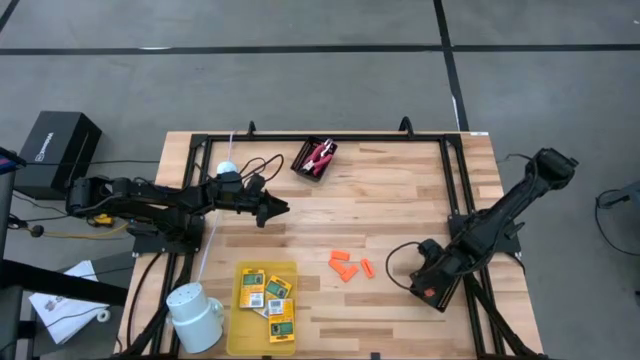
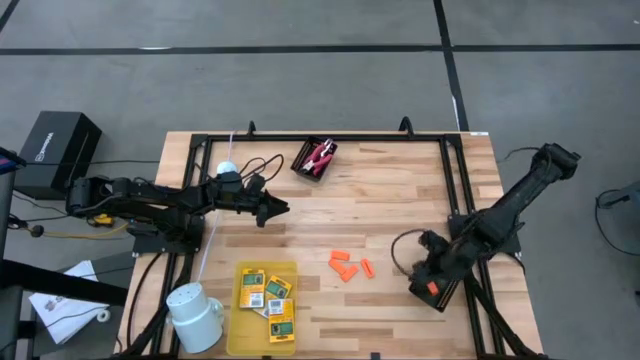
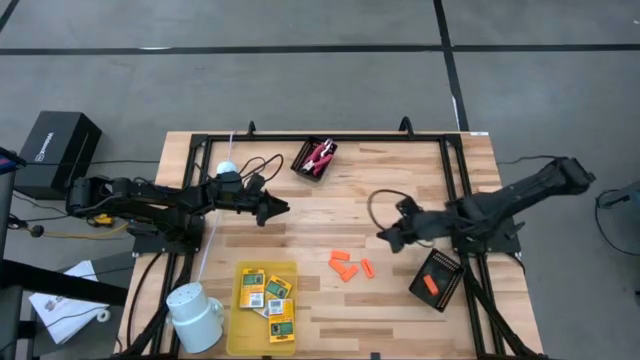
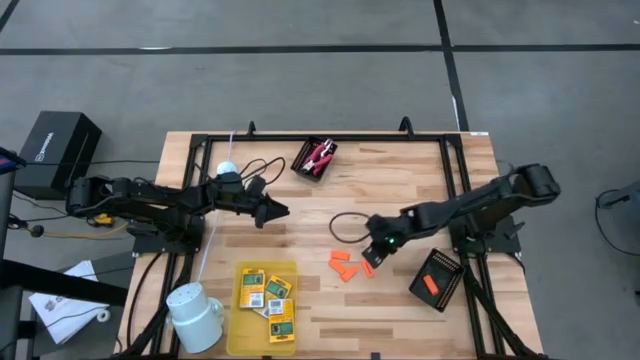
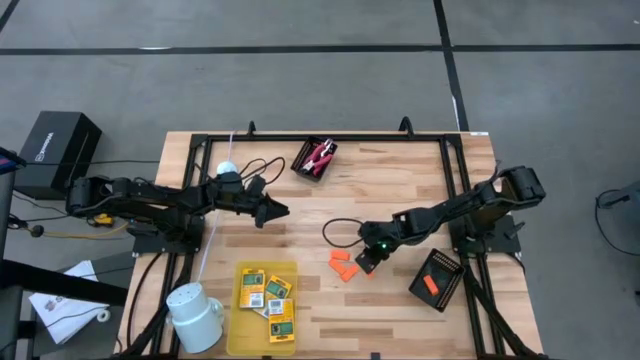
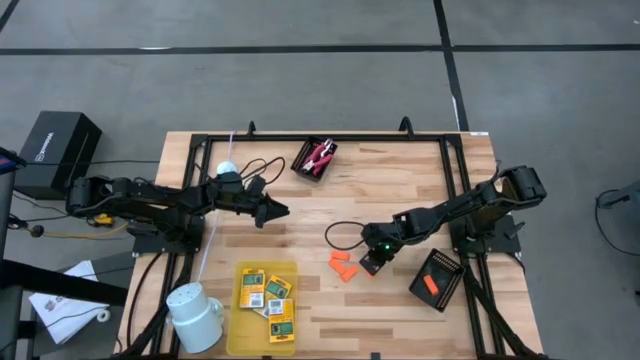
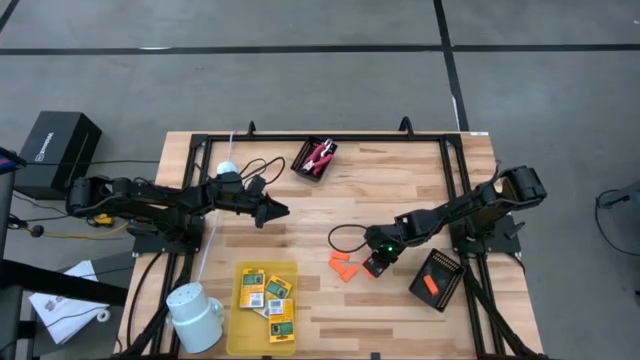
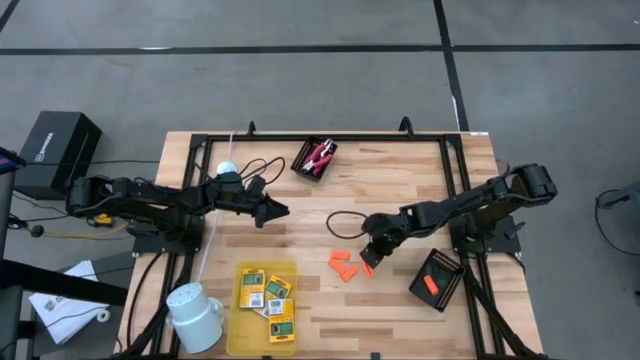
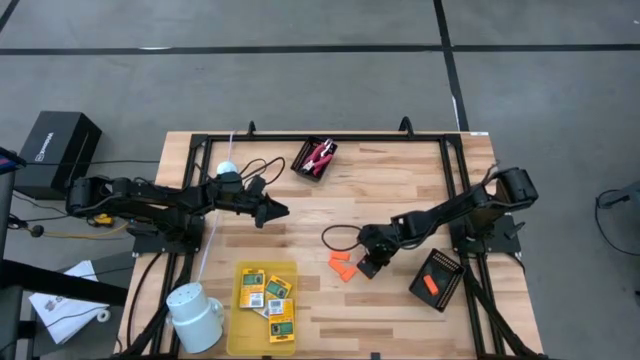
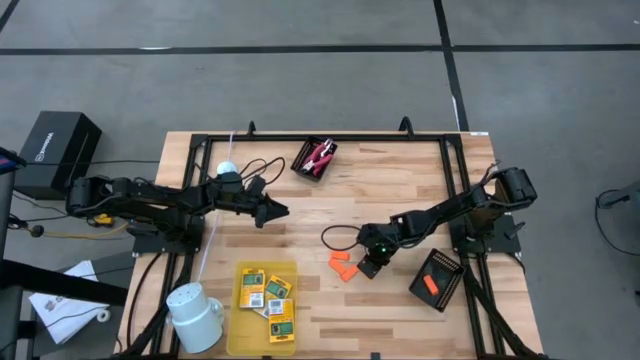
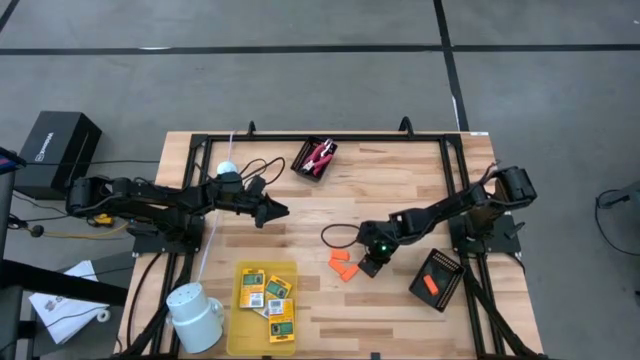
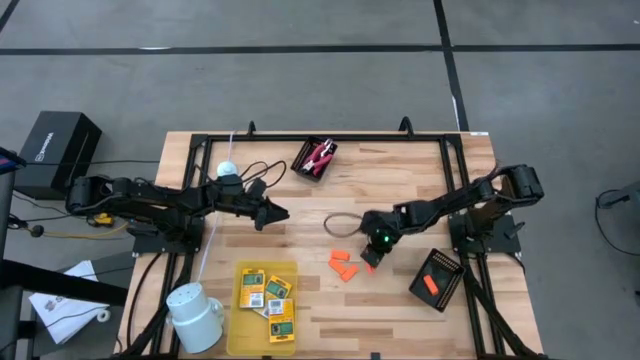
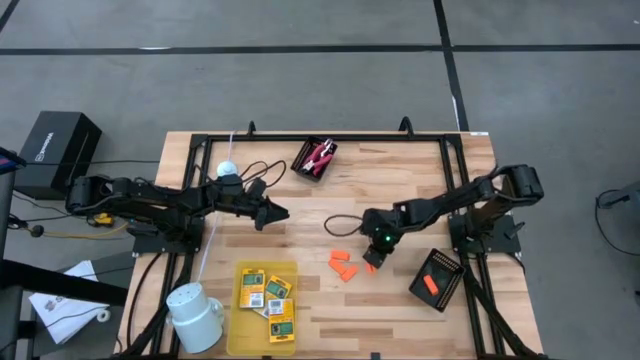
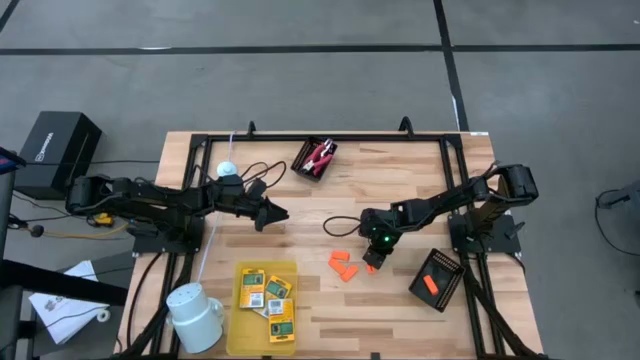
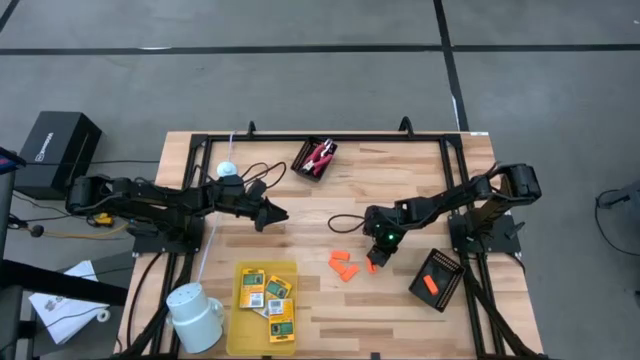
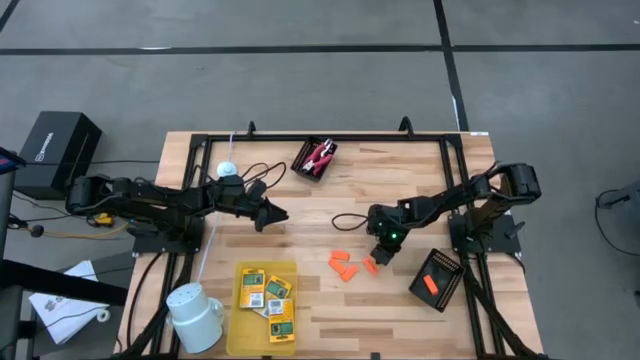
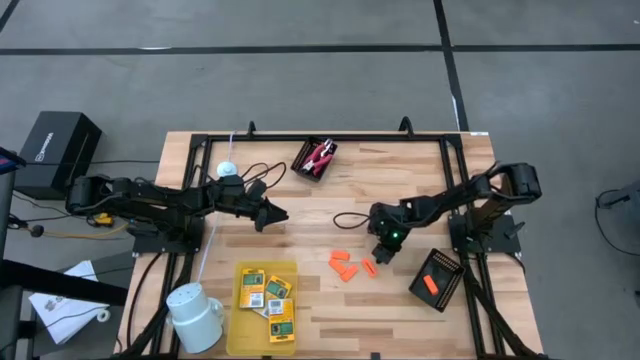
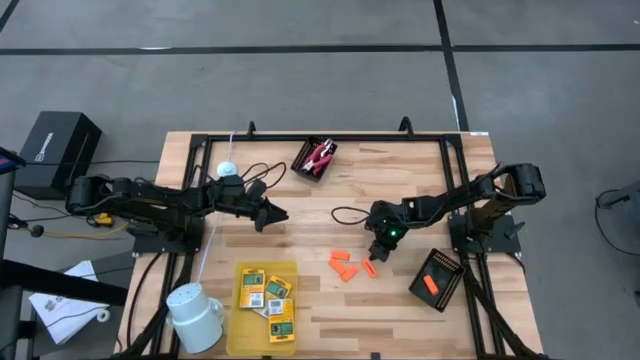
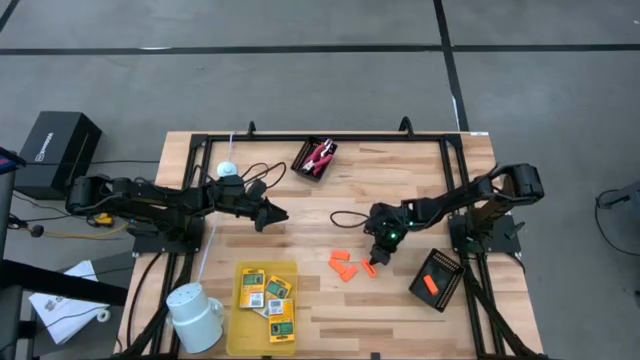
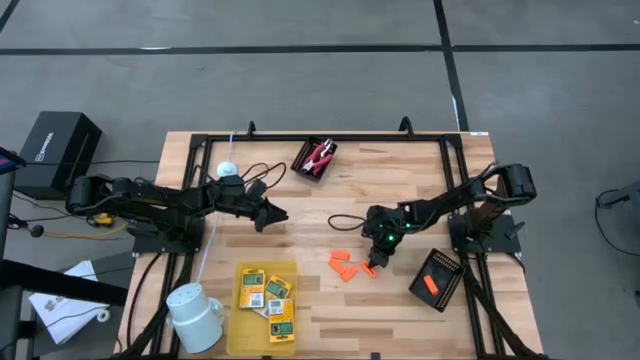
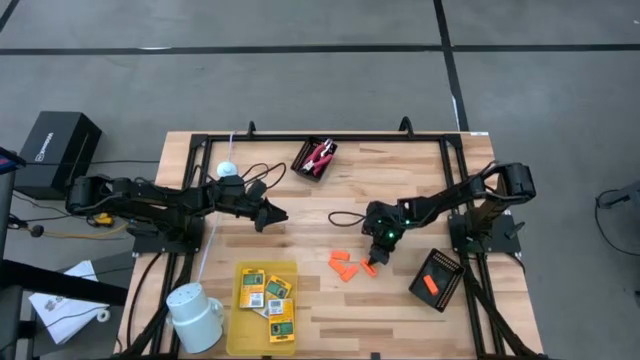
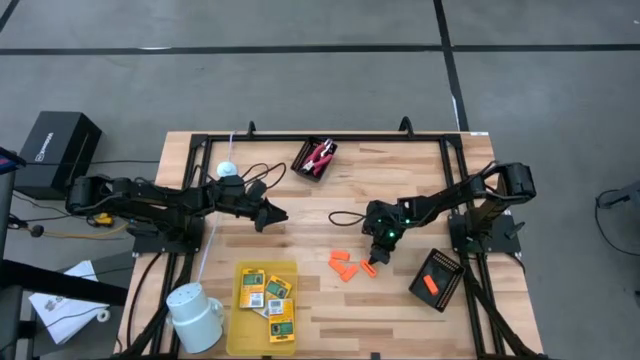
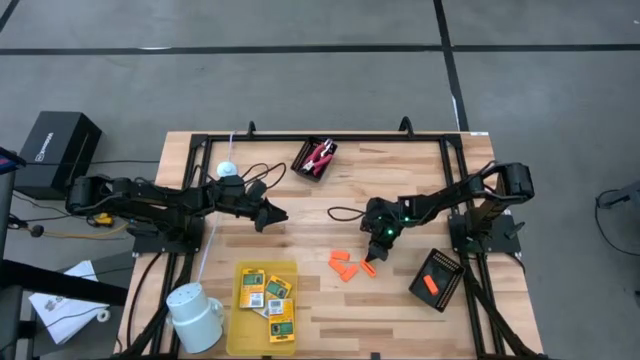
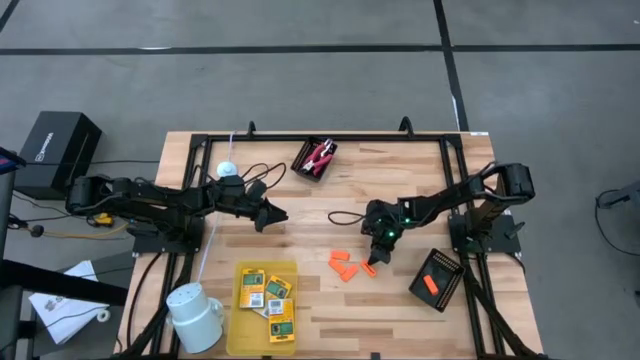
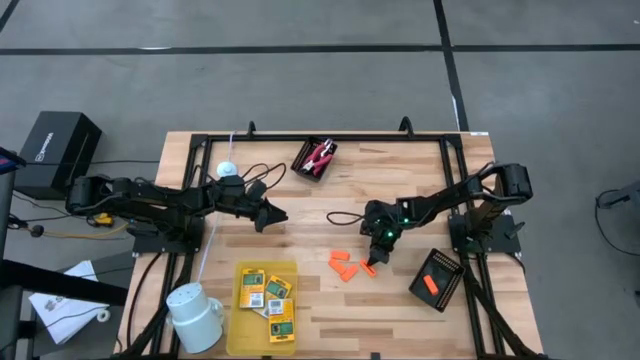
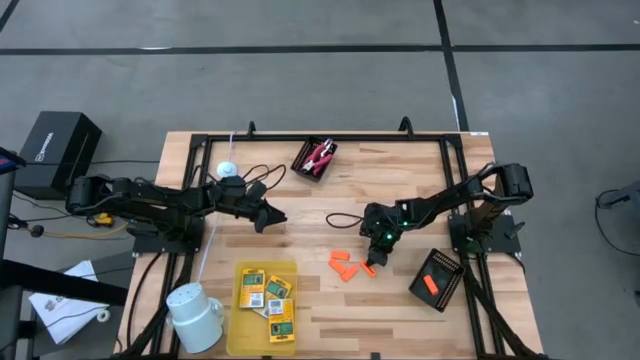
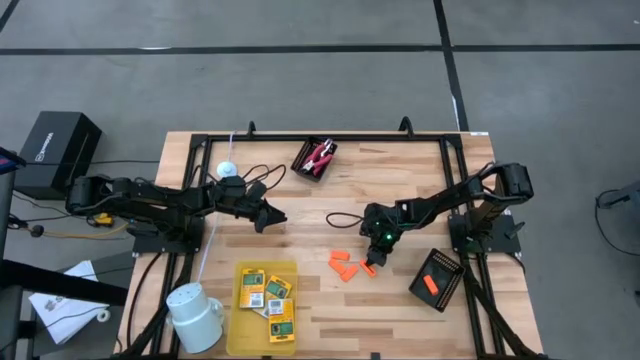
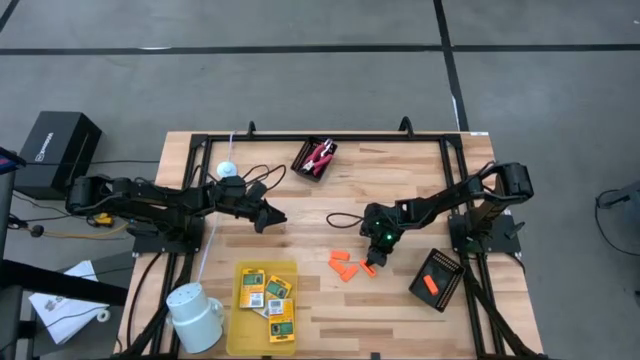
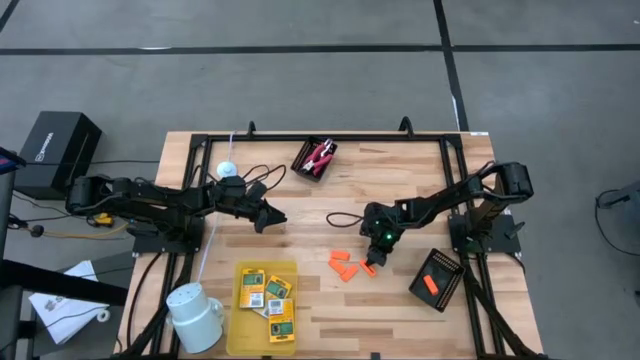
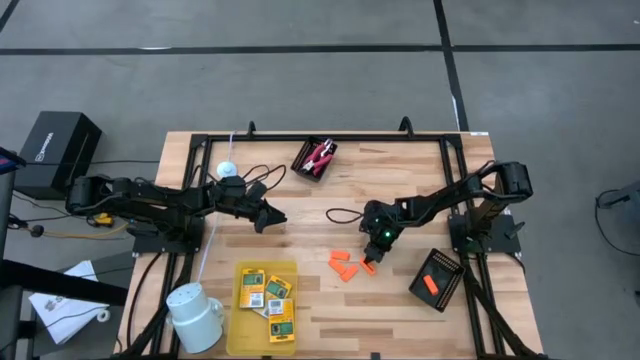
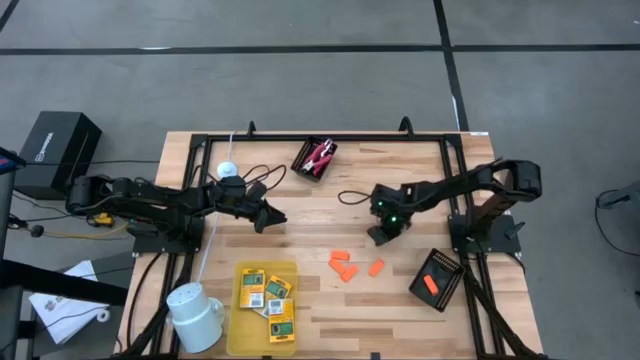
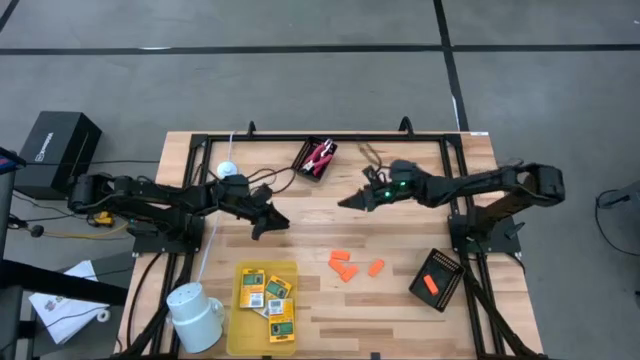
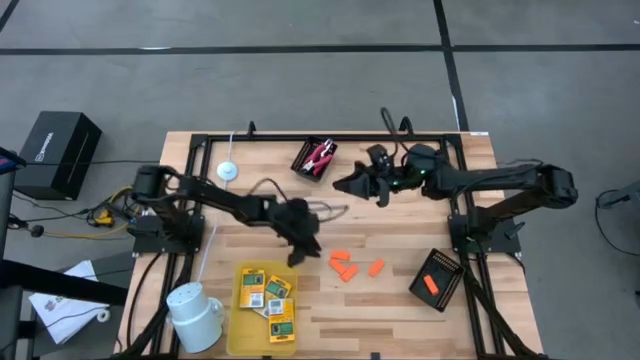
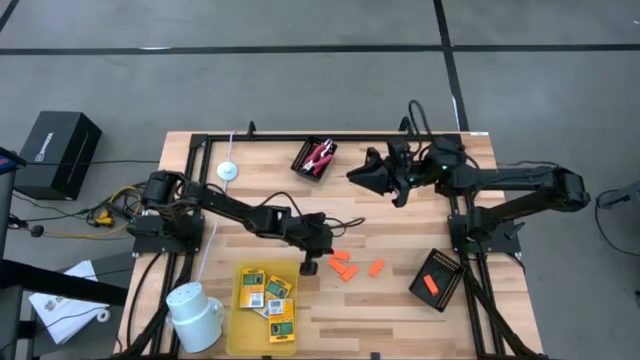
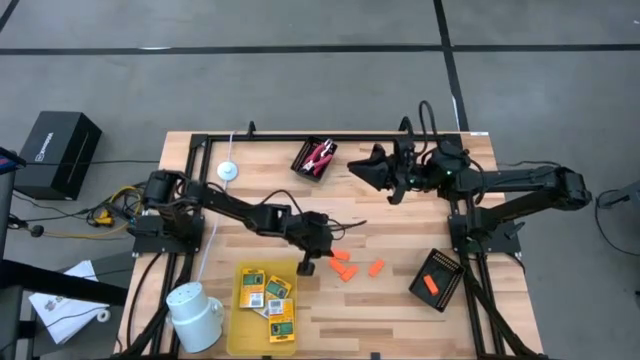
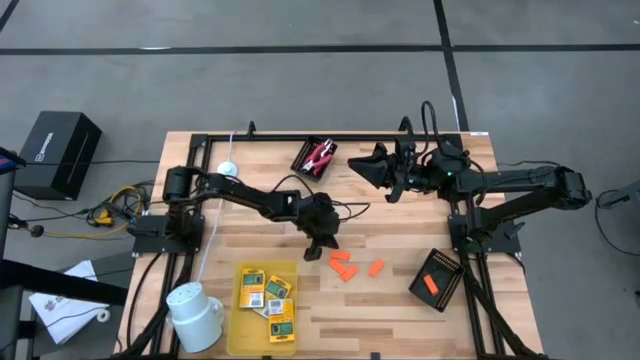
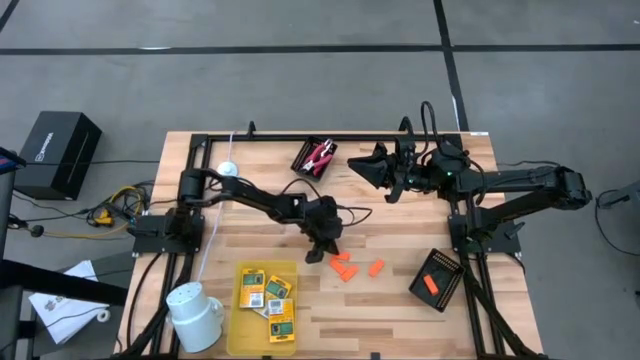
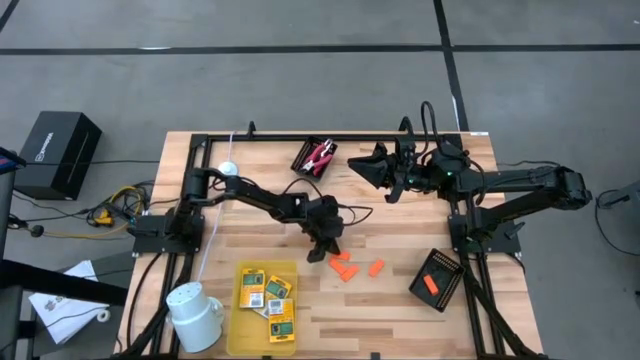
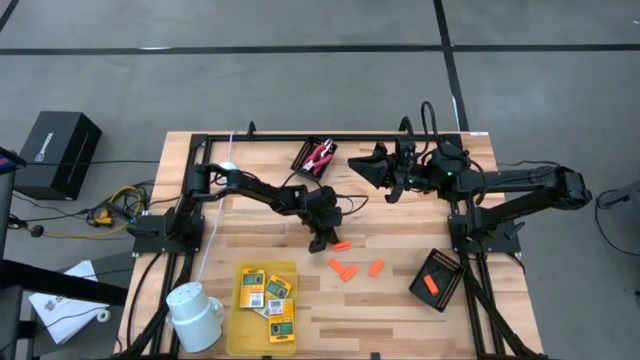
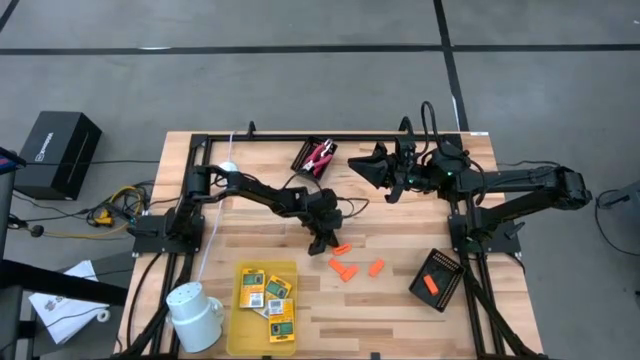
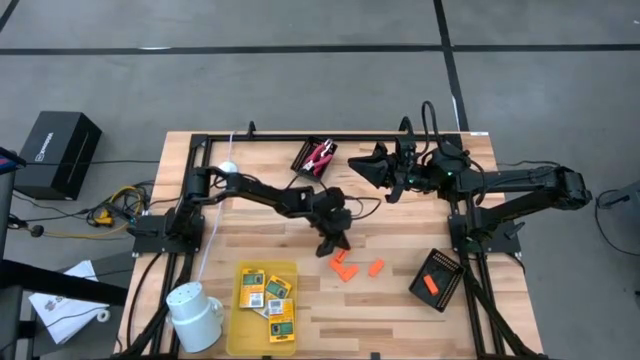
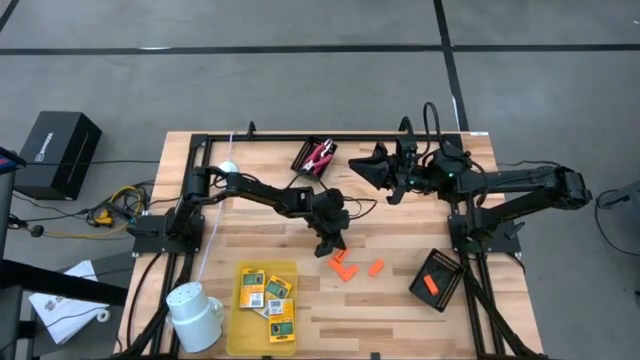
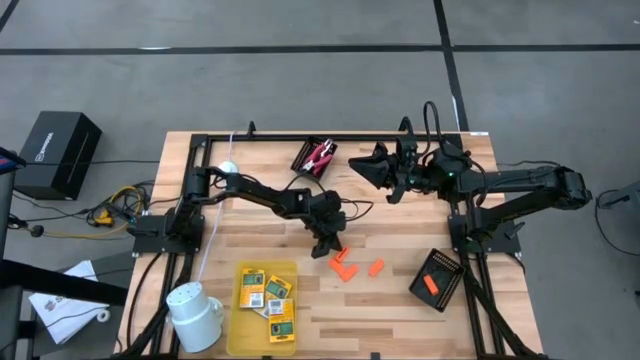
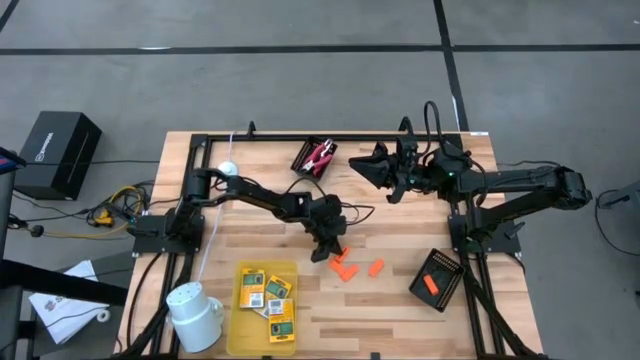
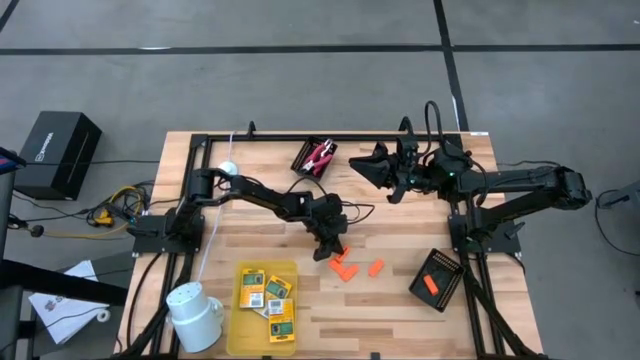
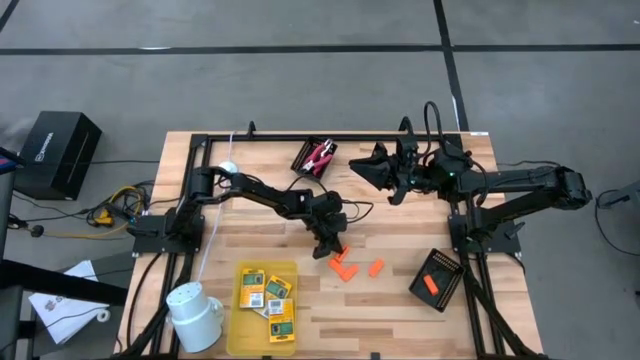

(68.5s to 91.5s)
Task: Pick & Place School Supplies
Put the orange eraser into the bottom black bin
